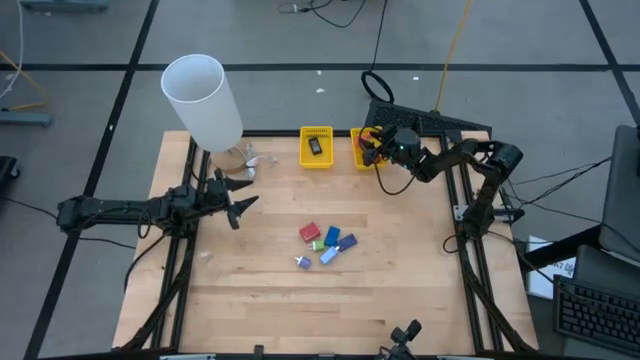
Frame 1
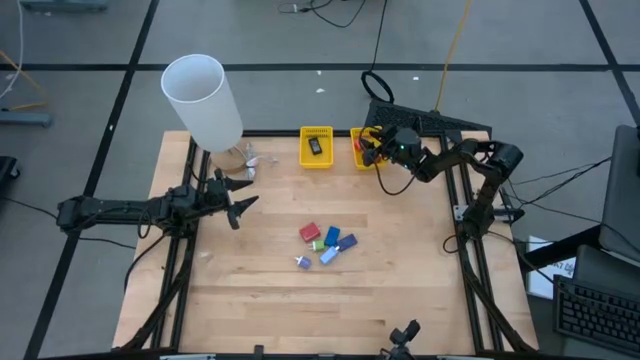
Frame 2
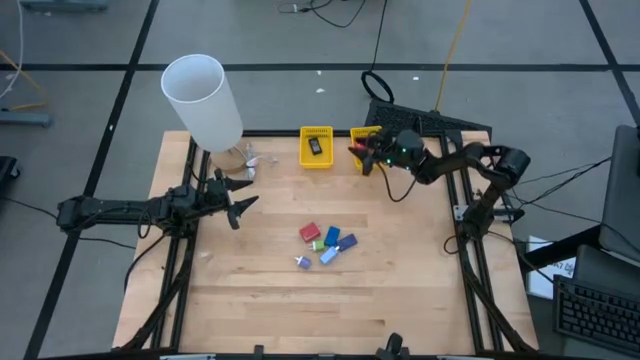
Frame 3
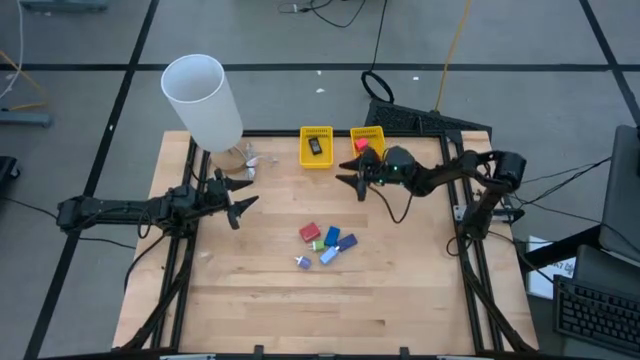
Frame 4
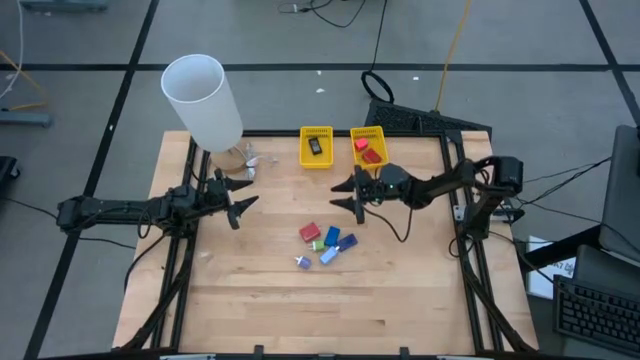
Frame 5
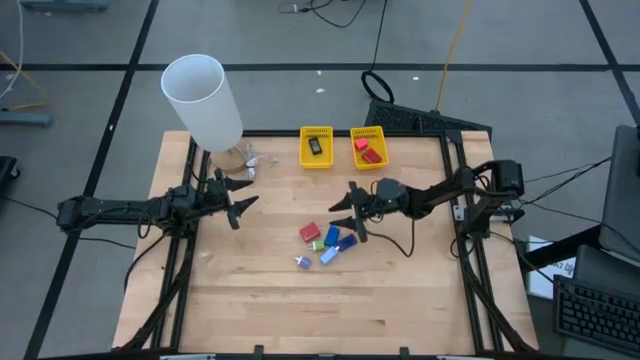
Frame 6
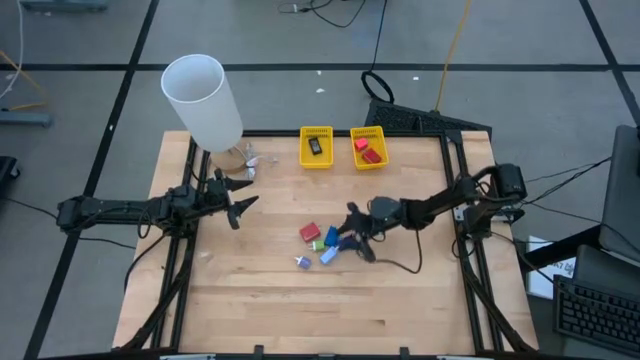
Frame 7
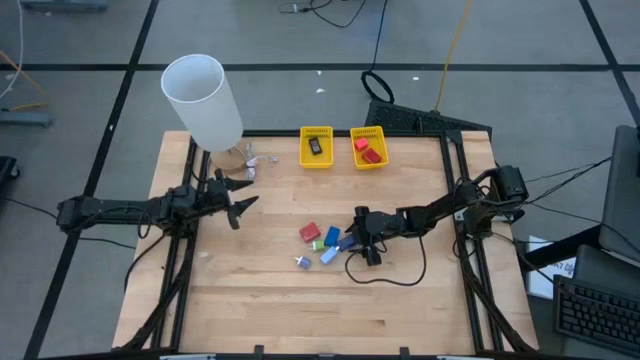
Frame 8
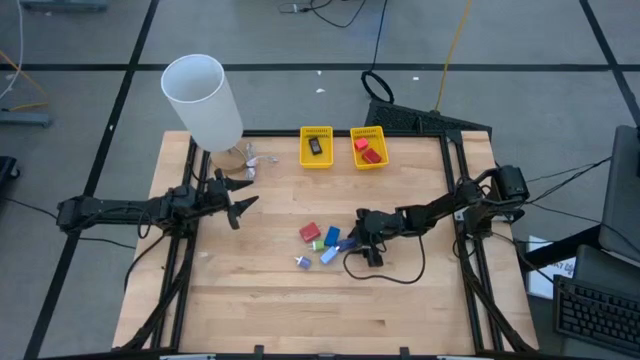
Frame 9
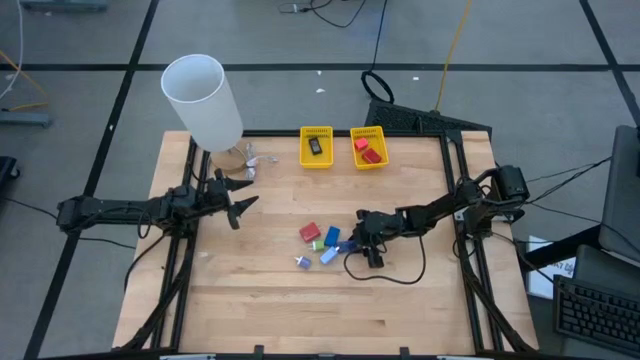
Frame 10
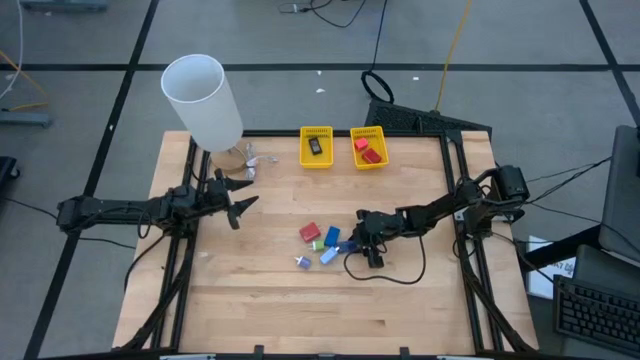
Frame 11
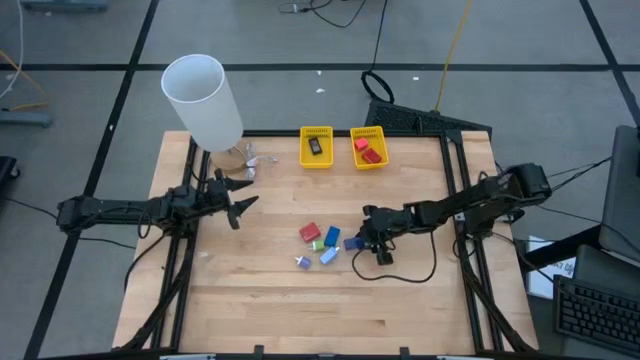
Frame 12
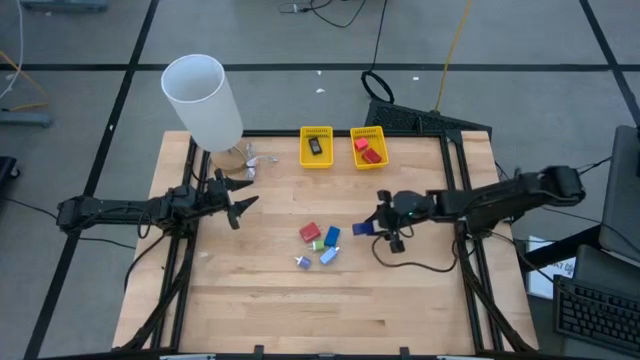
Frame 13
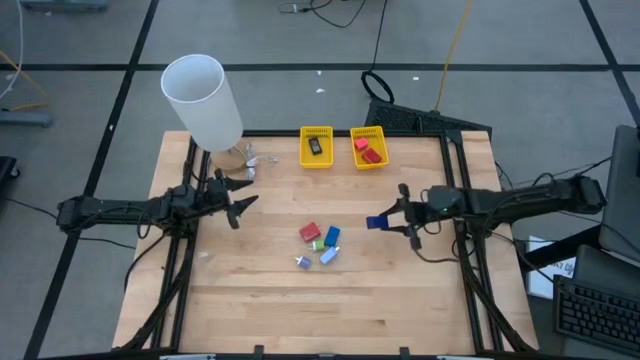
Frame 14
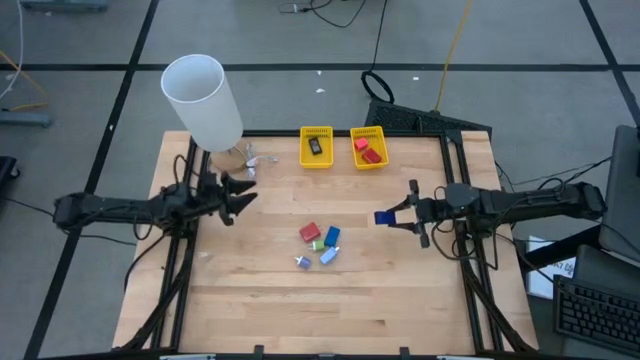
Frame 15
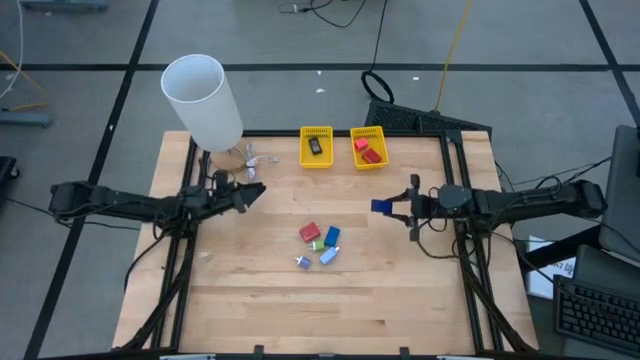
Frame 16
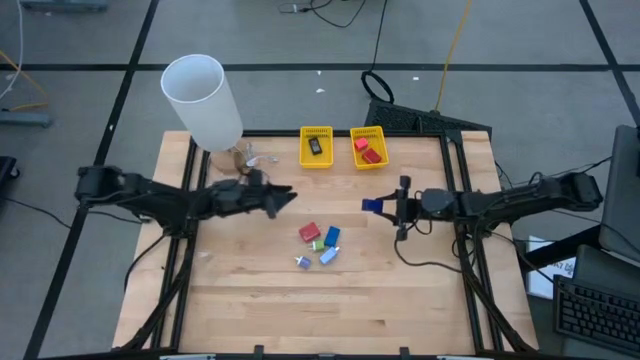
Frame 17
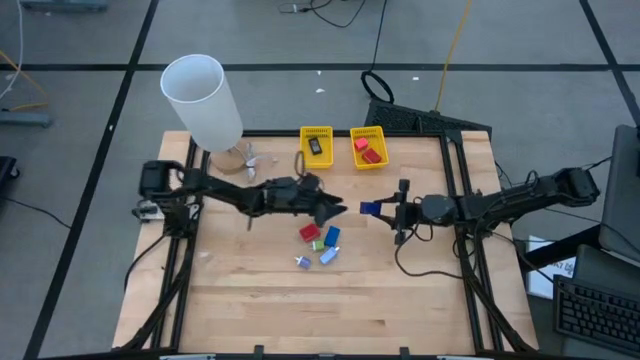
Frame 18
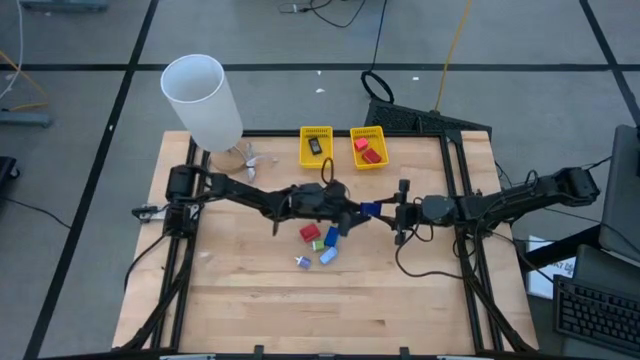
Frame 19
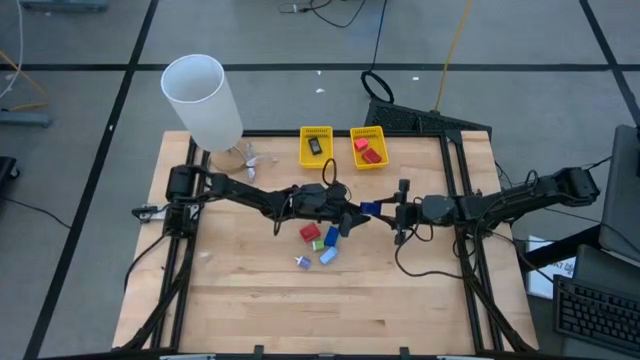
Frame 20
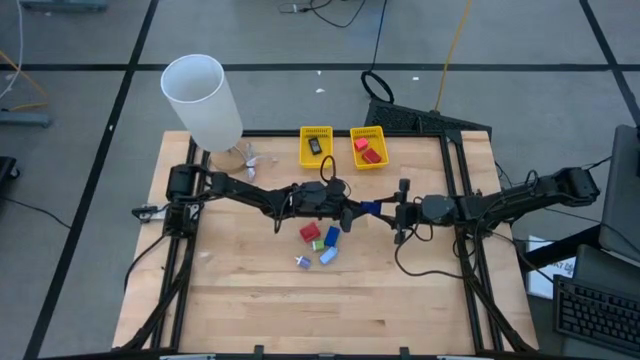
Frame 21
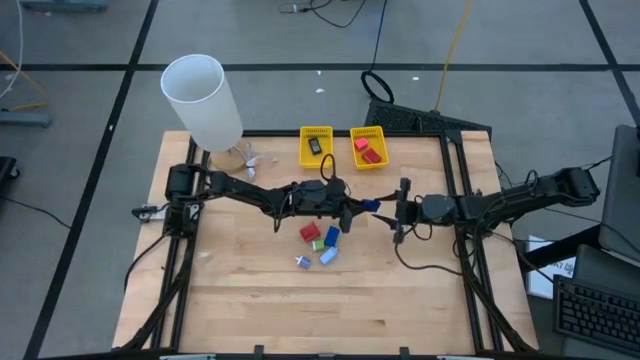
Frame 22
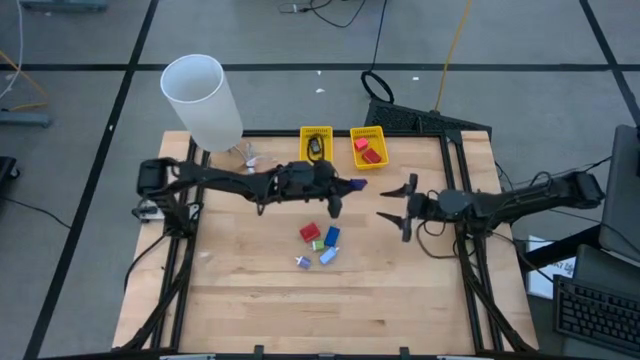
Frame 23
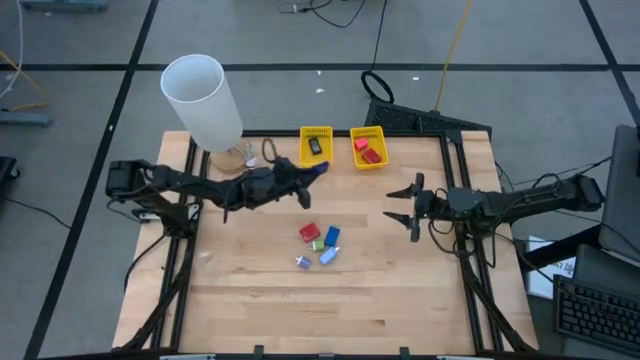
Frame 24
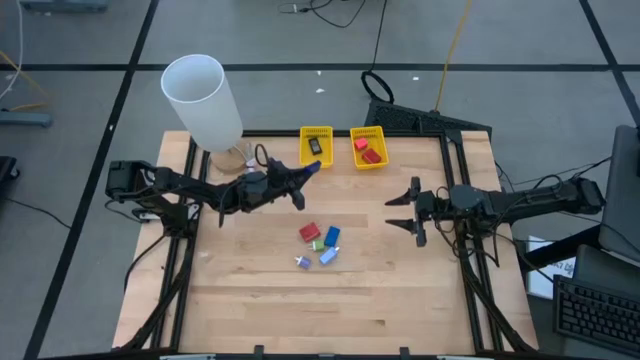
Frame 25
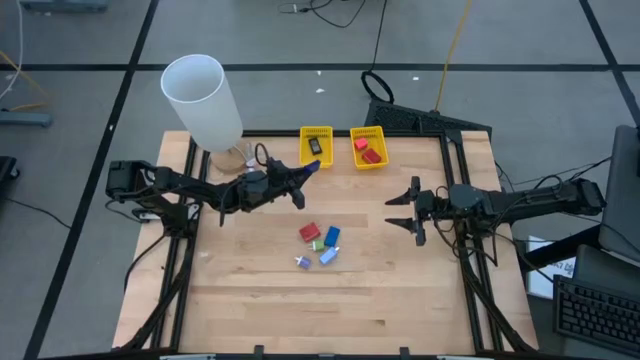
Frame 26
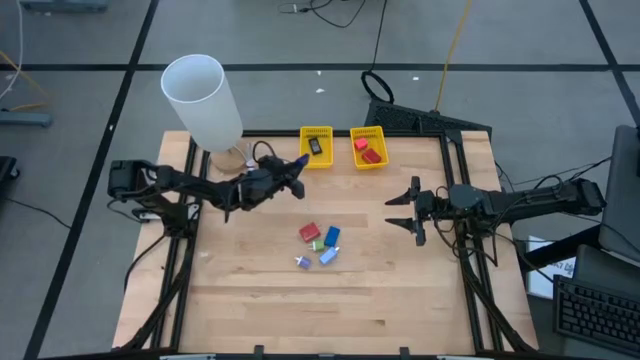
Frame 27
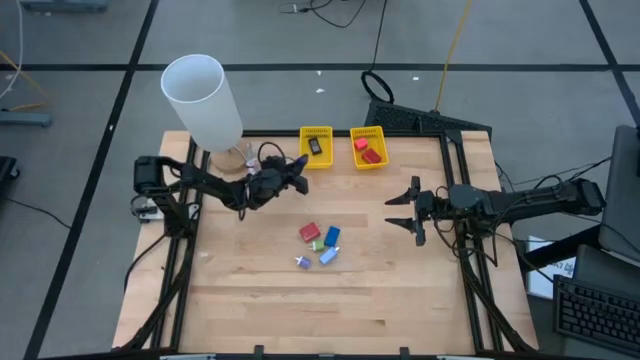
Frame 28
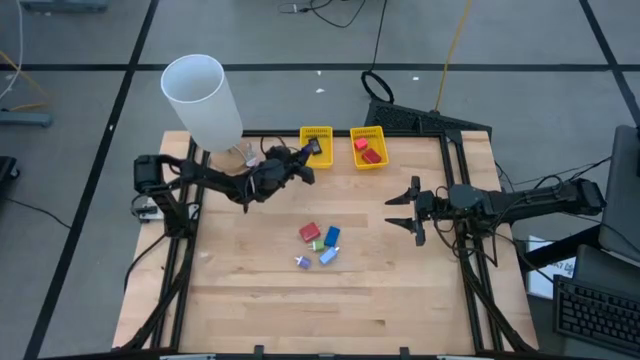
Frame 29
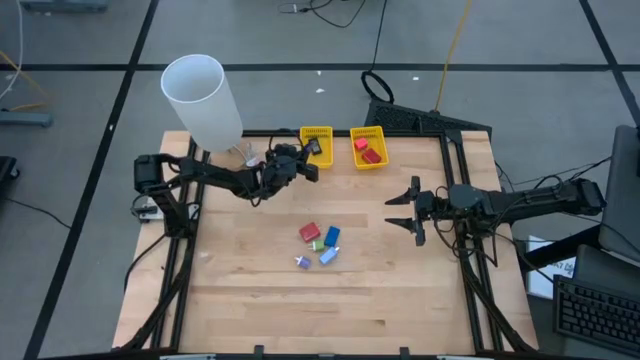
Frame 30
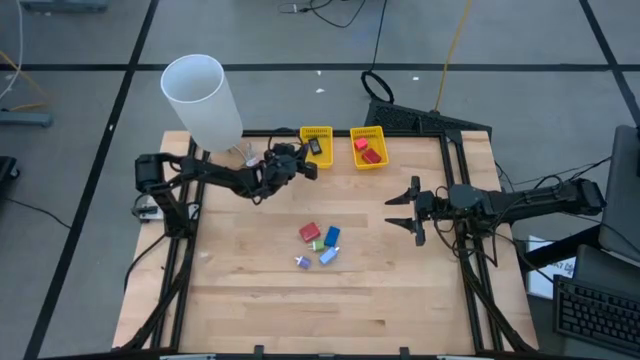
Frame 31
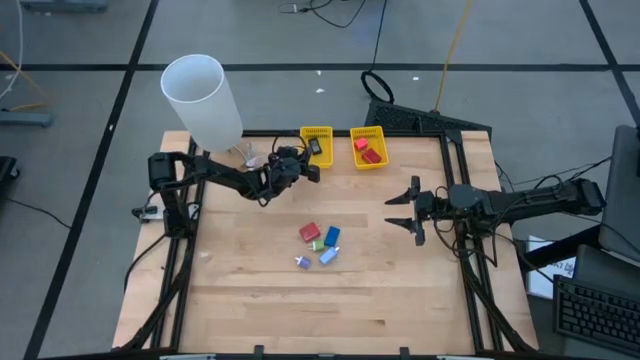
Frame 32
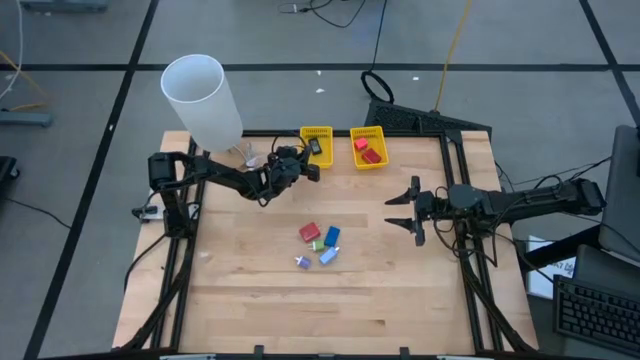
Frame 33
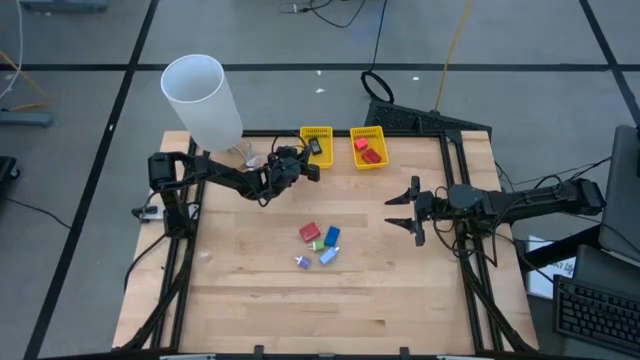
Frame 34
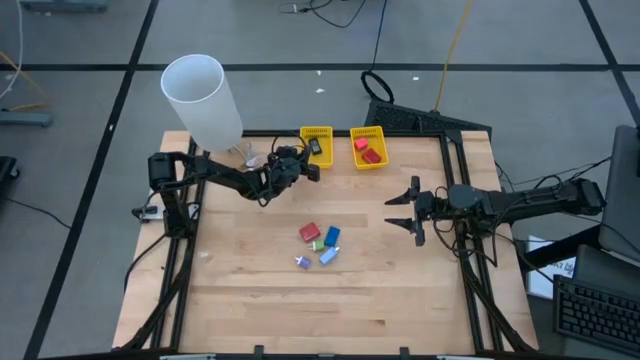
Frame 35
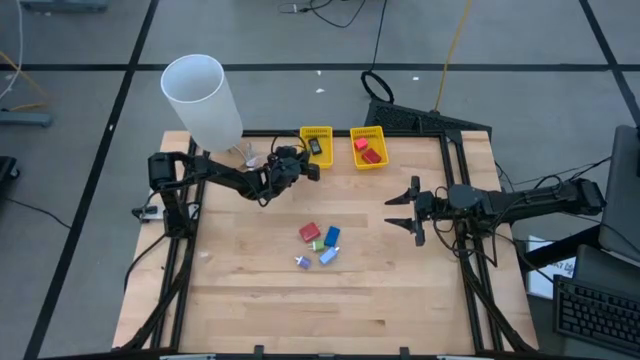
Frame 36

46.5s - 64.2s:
Task: Pick & Place Office items
Put the dark blue digital clock into the left yellow bin

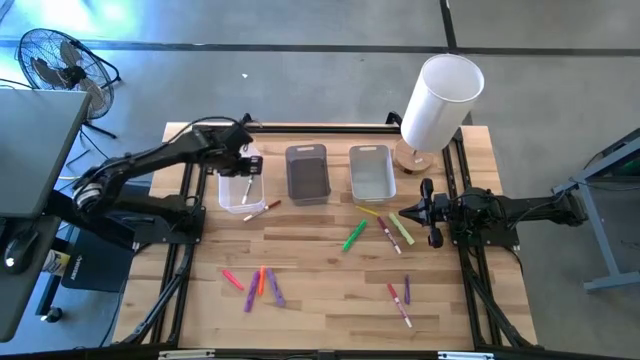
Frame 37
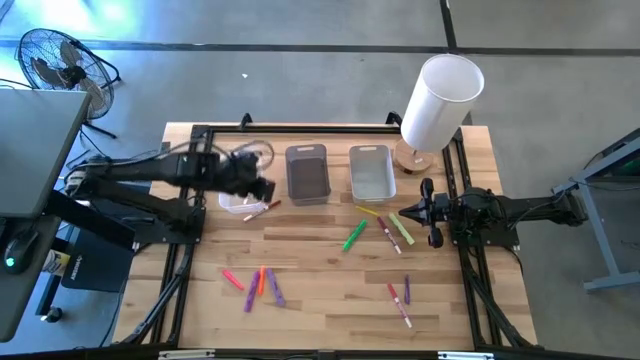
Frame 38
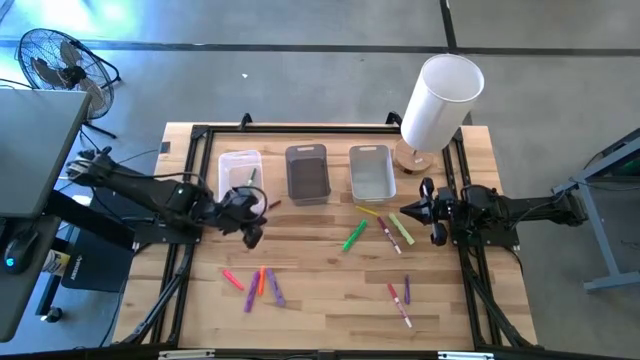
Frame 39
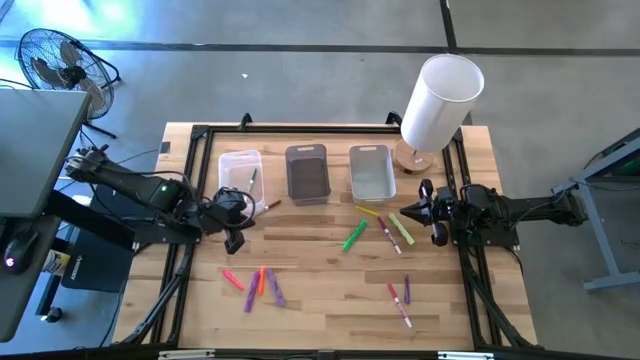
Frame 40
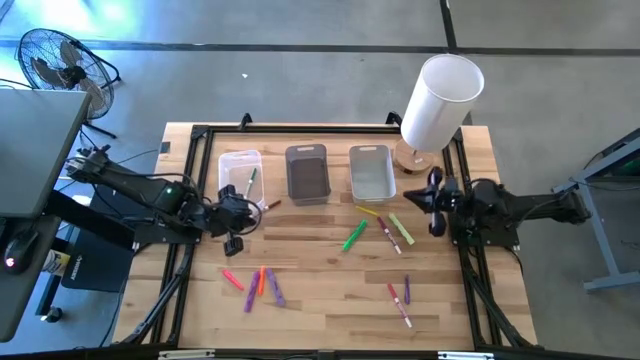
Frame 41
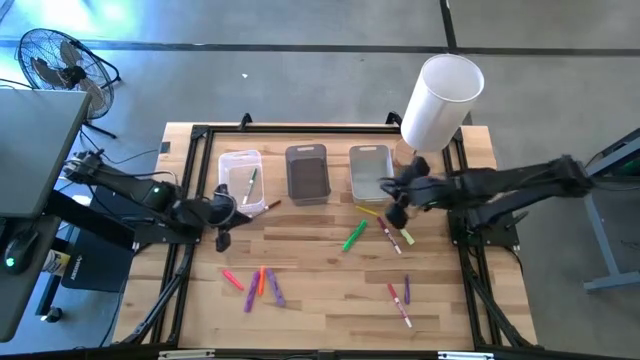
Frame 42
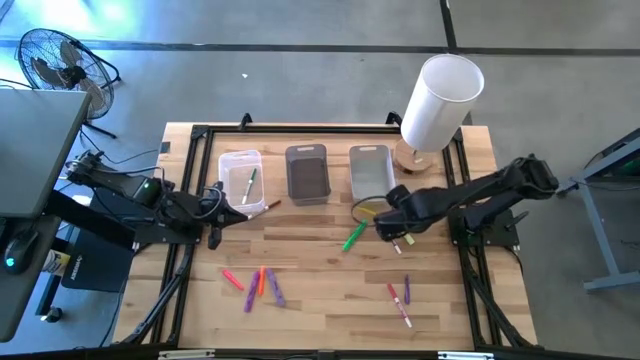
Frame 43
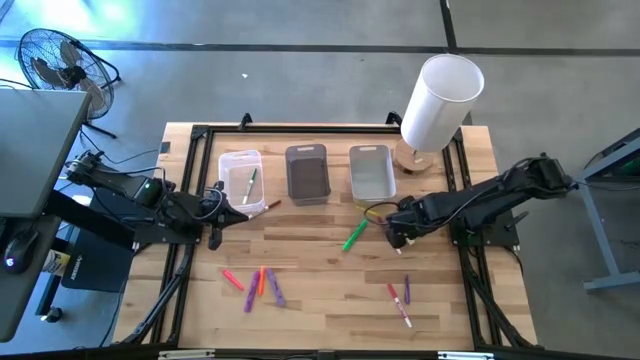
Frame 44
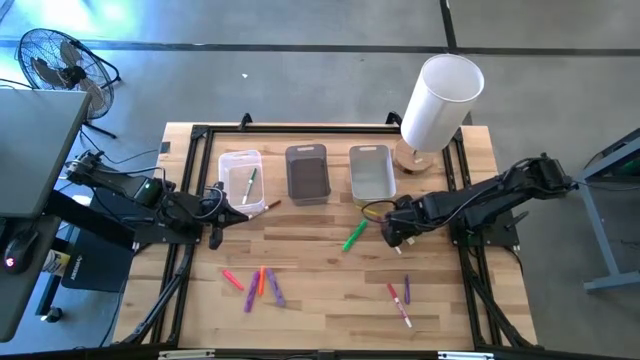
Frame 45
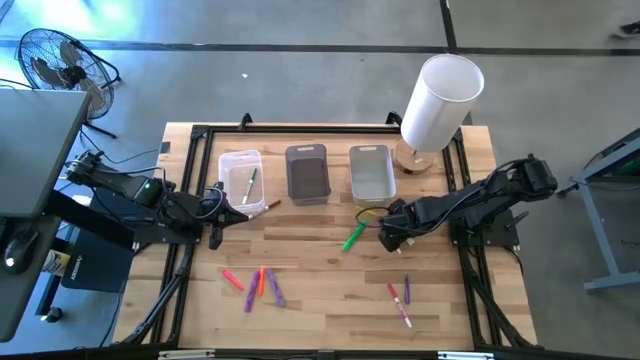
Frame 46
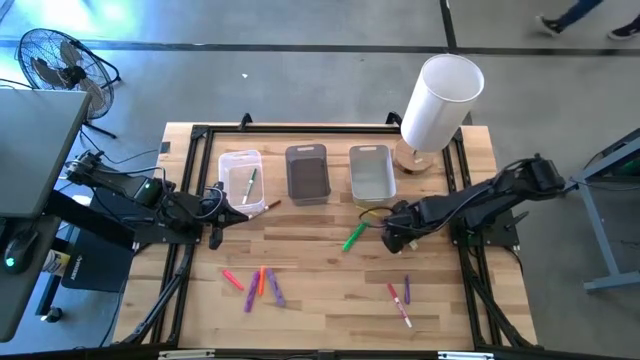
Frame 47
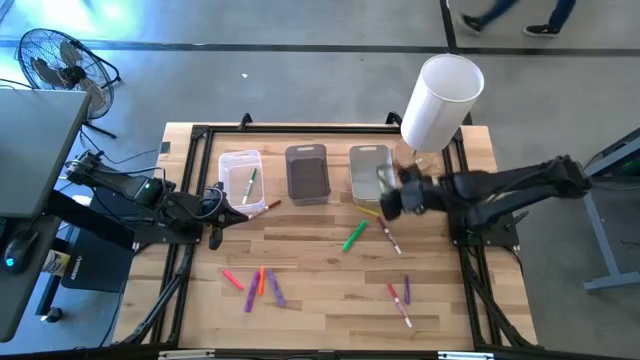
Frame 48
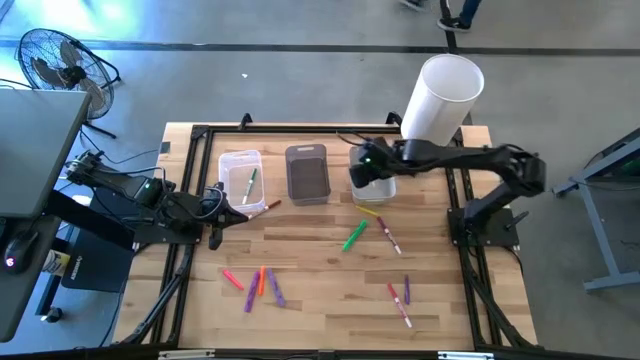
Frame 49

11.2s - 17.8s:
Task: Pick & Place Markers
Put the light green highlighter pen into the gray bin
